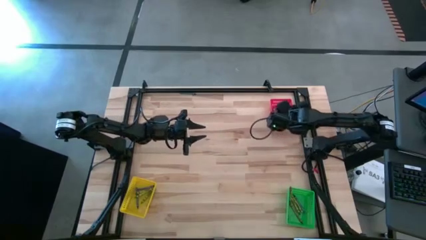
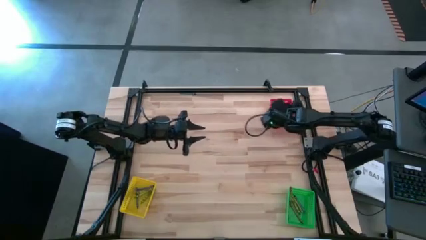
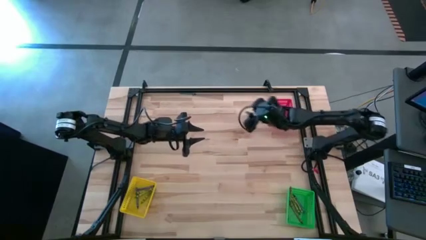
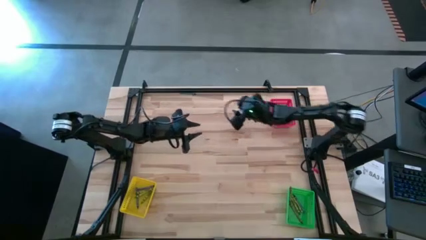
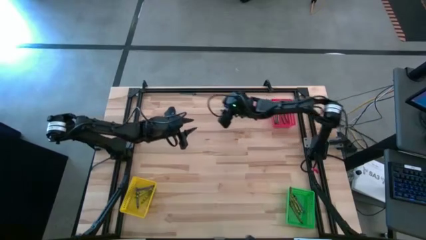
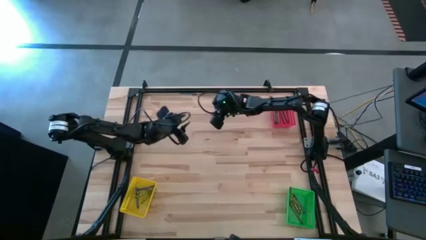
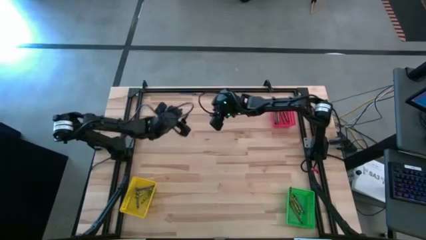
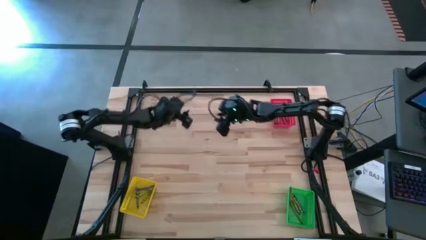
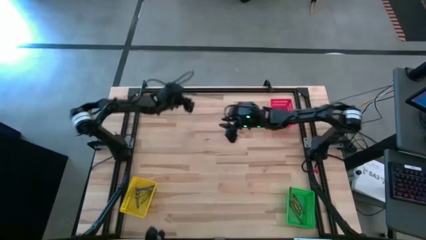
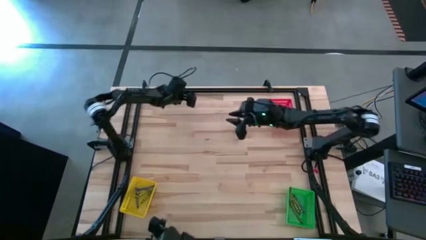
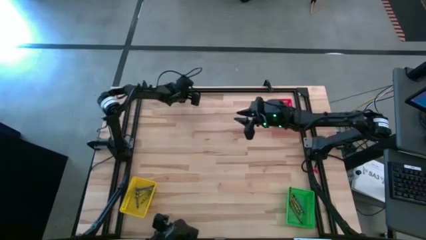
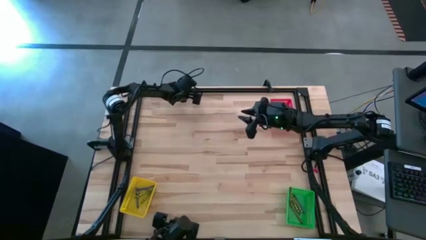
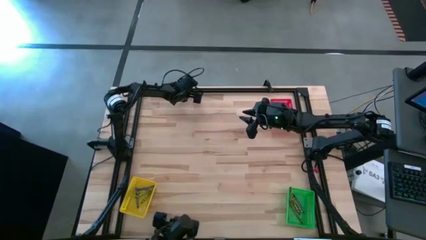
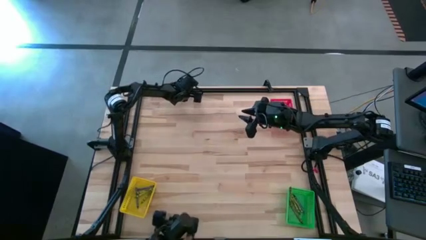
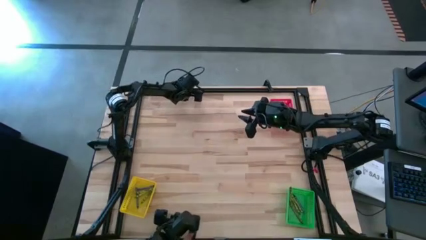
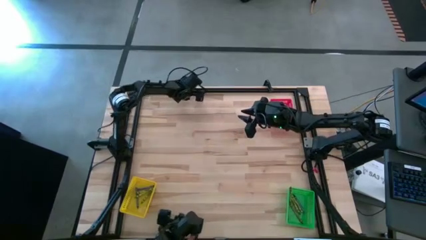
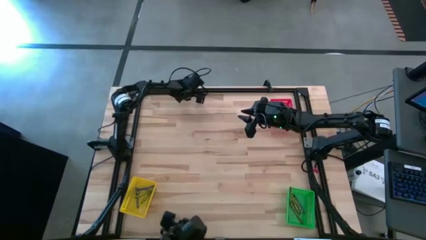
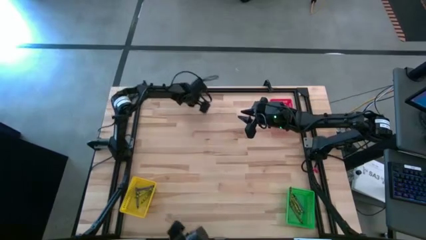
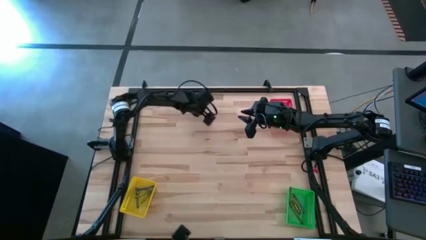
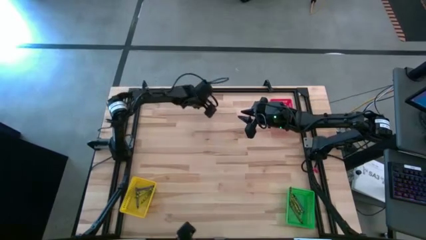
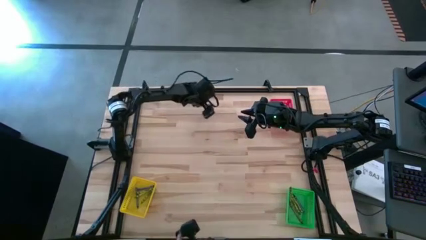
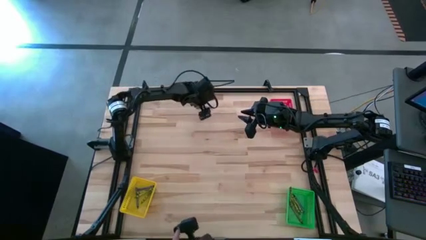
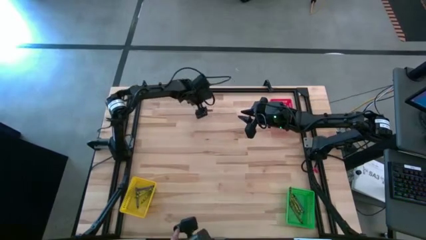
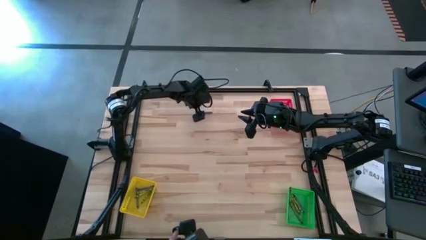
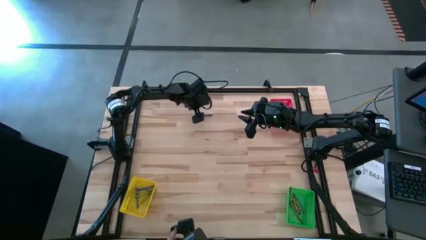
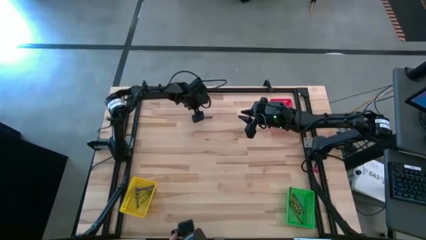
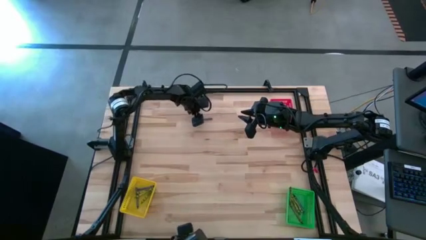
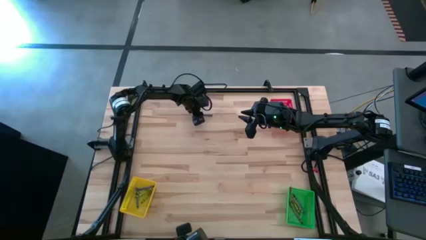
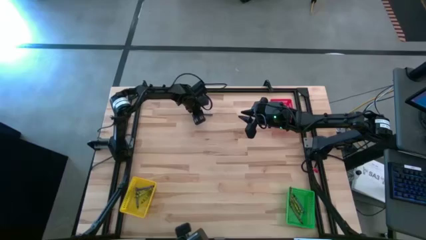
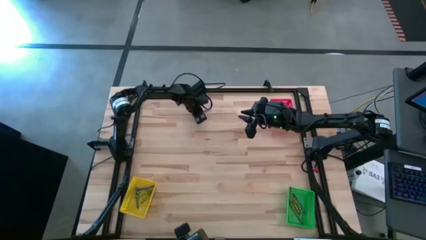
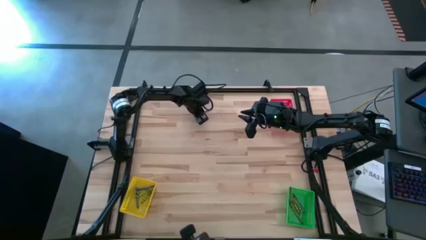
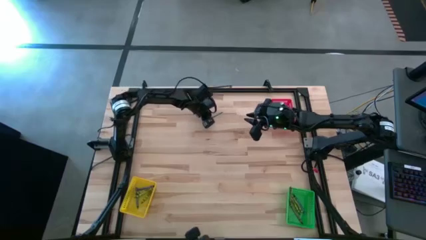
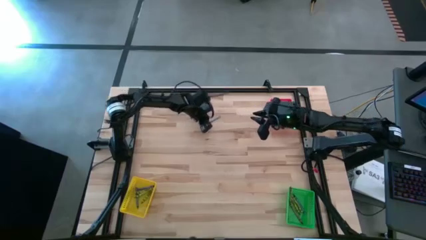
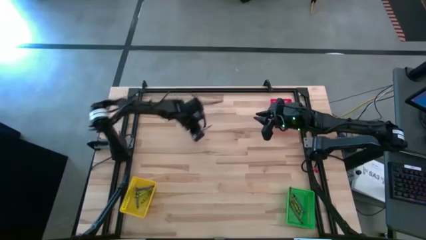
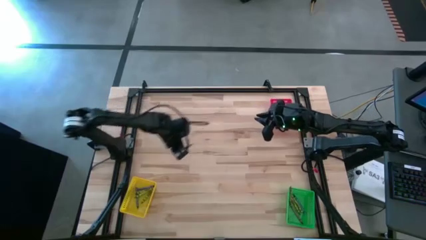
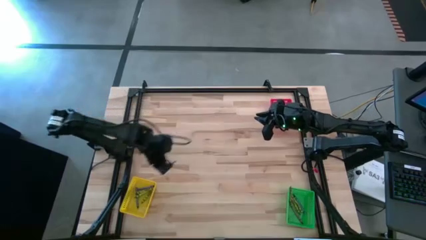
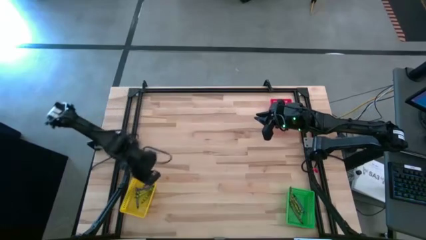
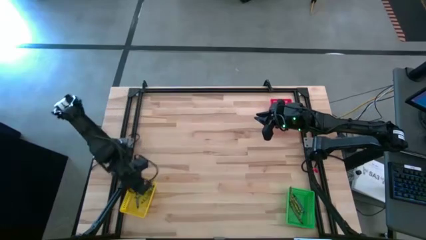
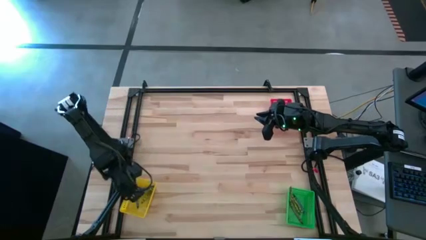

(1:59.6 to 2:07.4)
Task: Sort crayons
Put the blue crayon into the yellow bin

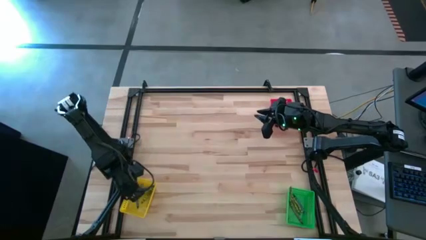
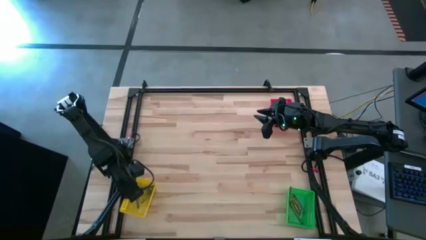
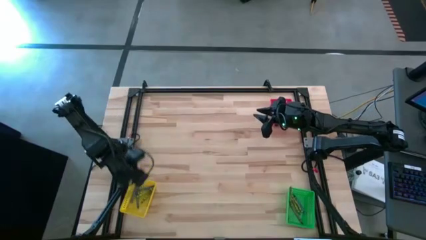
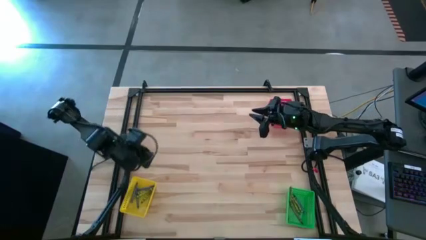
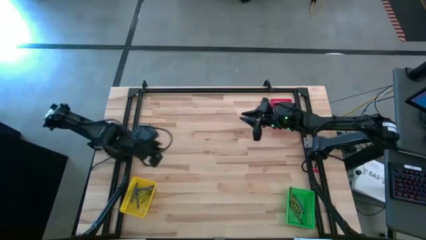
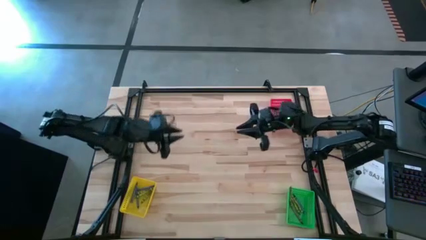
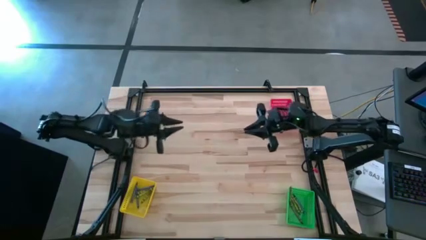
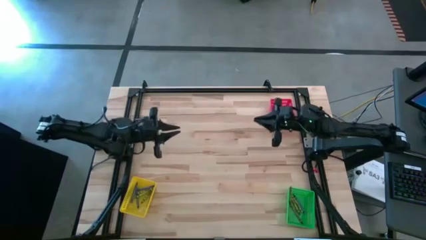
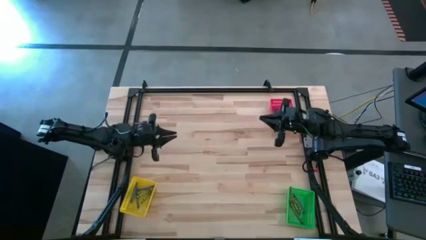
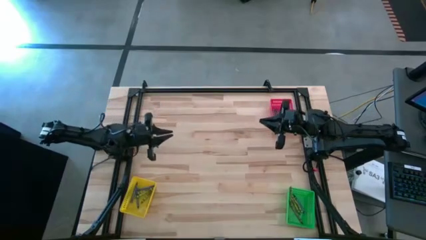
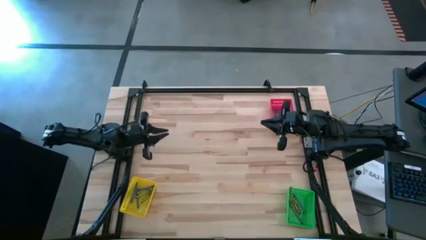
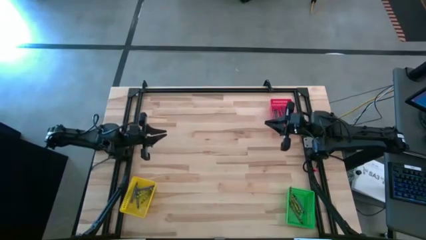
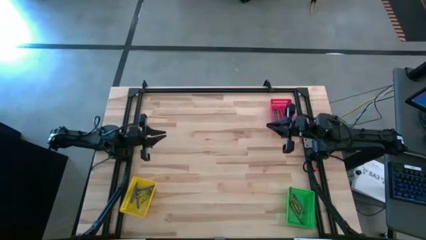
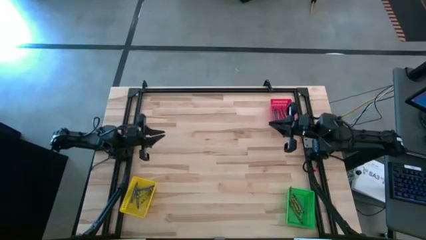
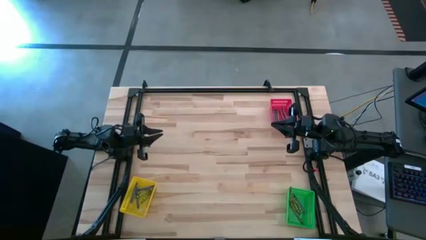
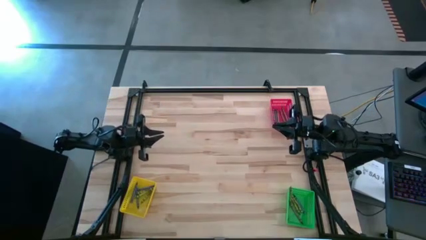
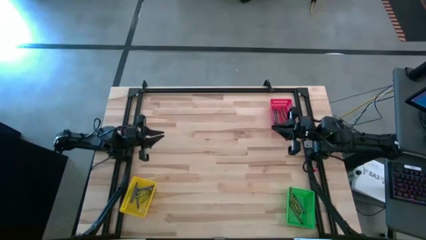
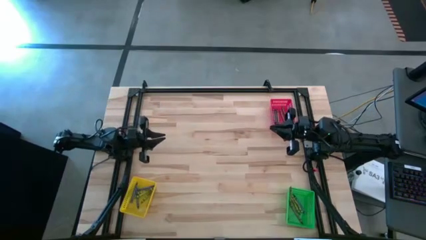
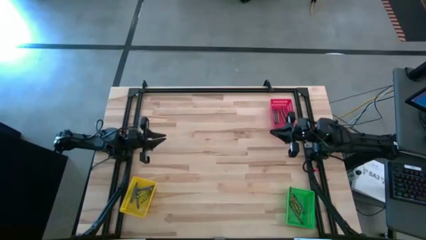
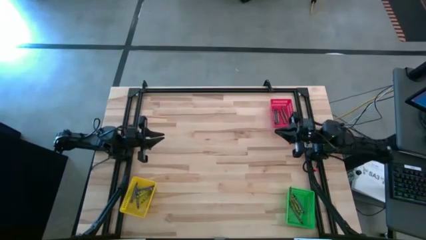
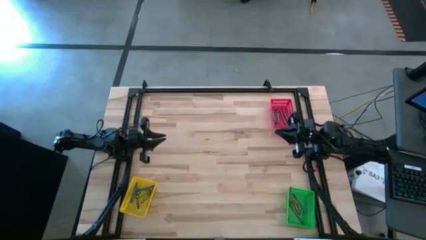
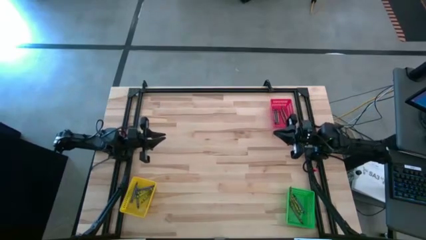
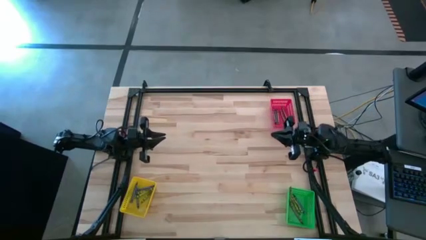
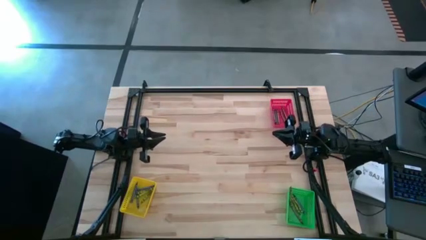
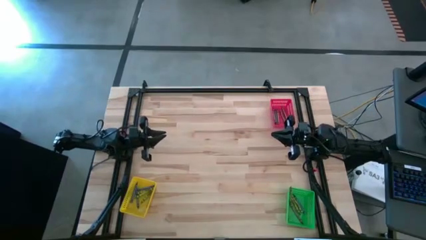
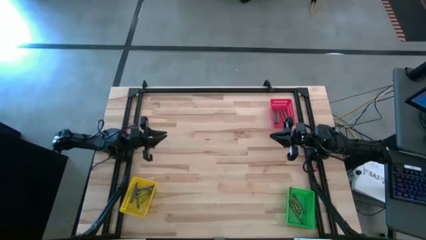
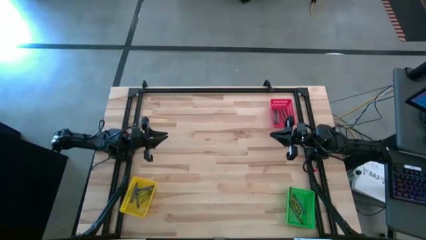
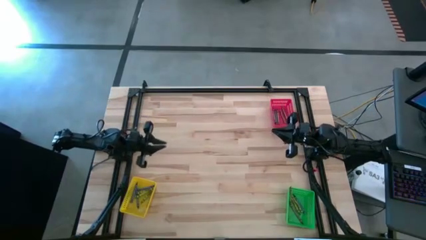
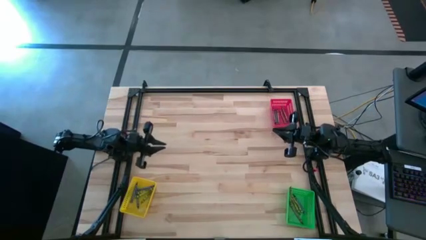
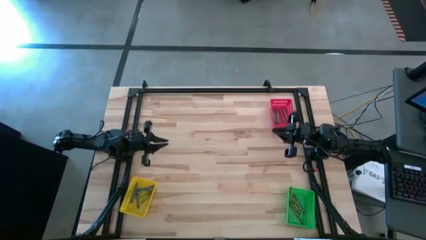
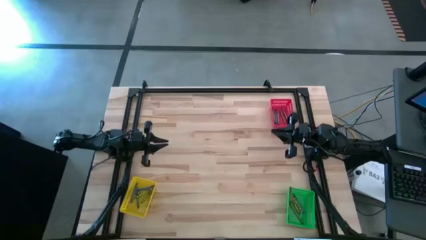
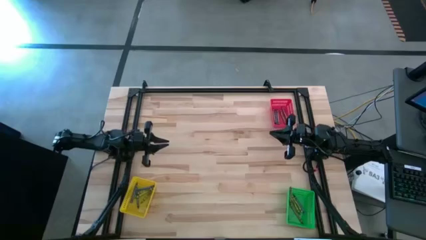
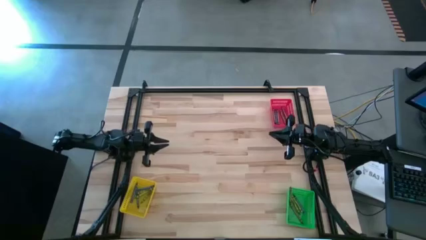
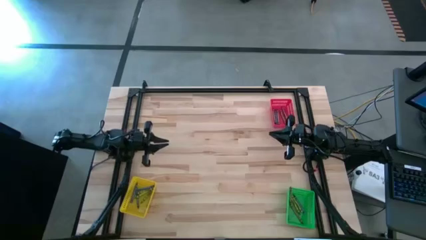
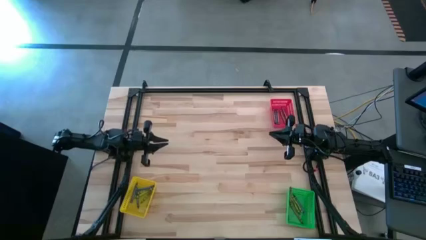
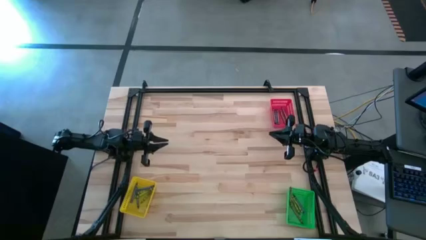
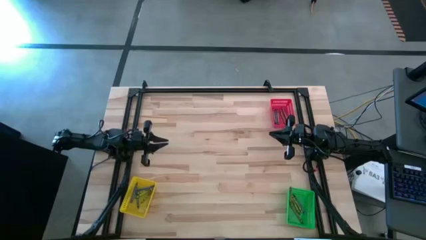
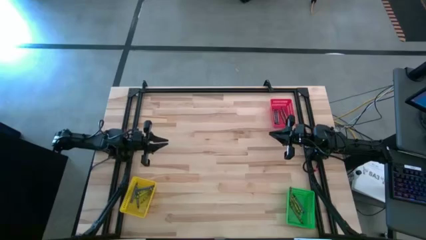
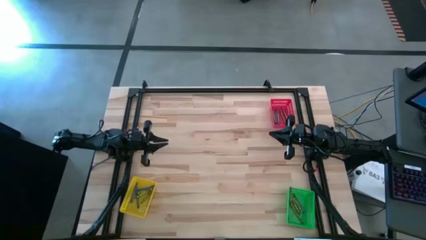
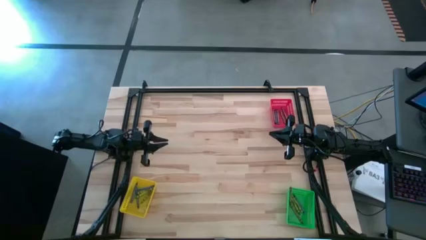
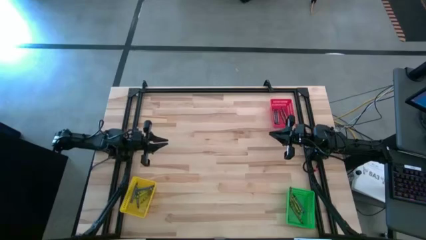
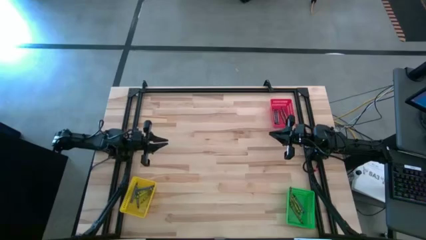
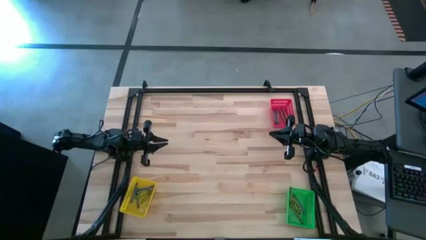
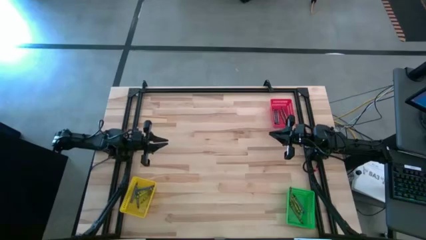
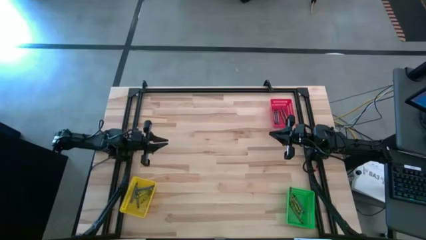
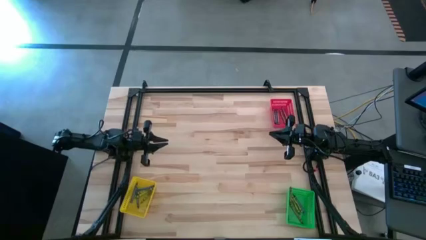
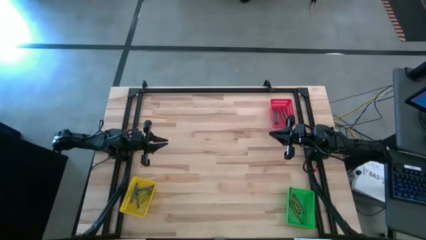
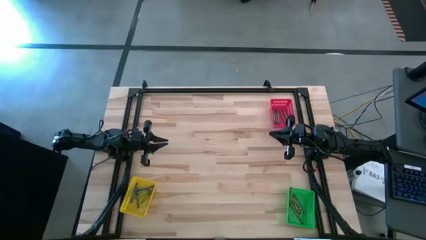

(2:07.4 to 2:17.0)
Return to Home Position
